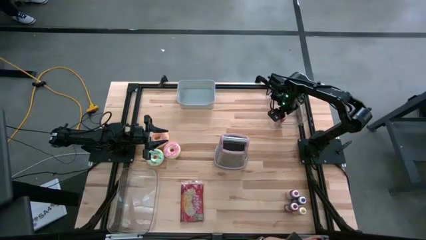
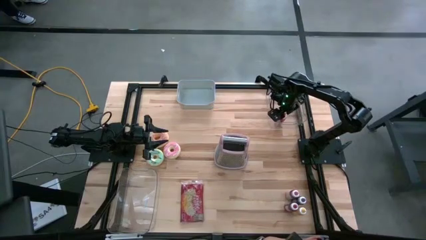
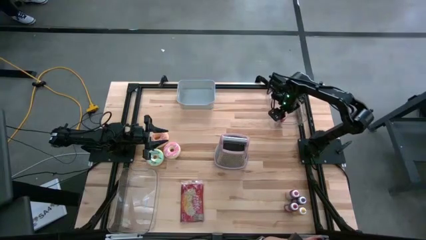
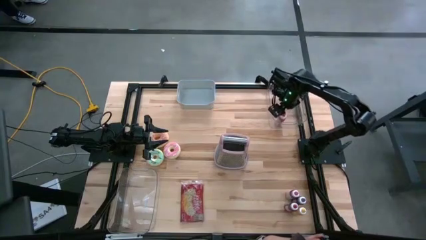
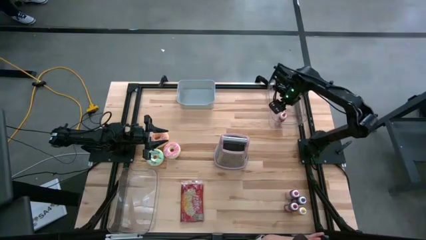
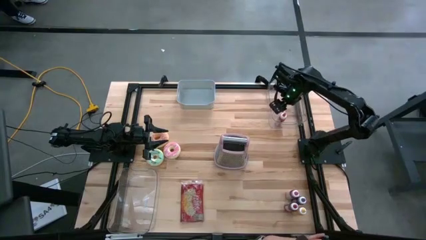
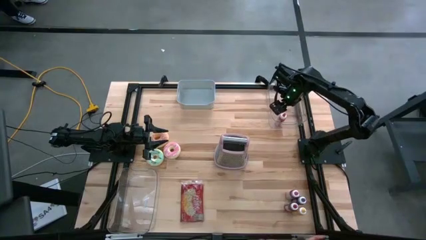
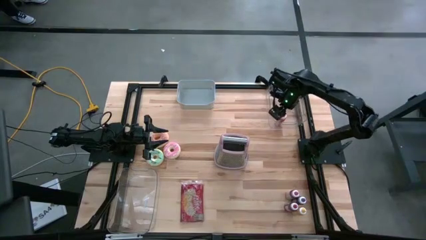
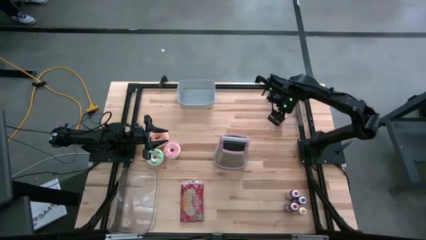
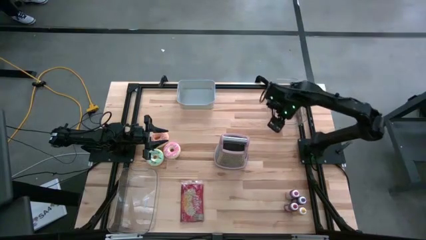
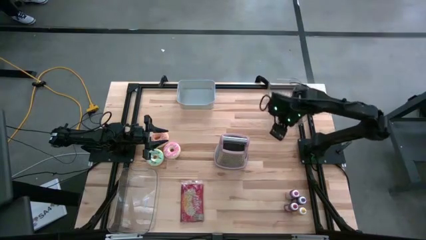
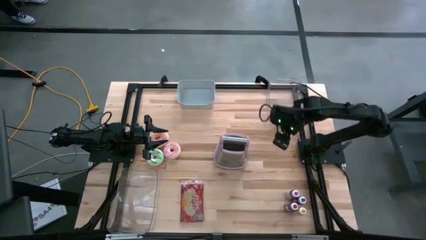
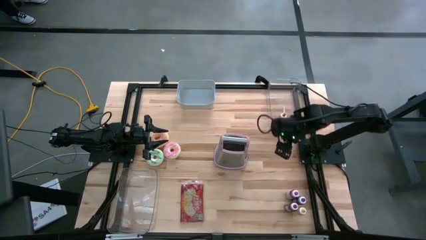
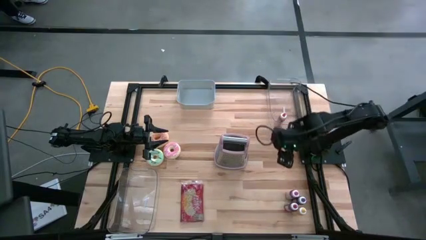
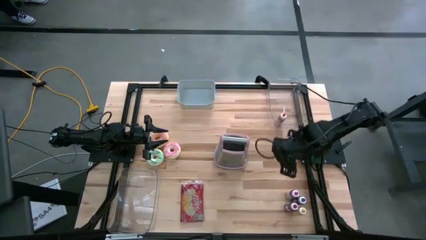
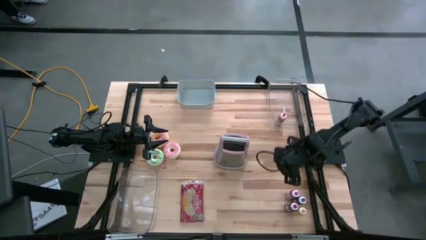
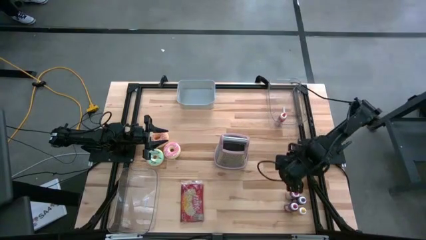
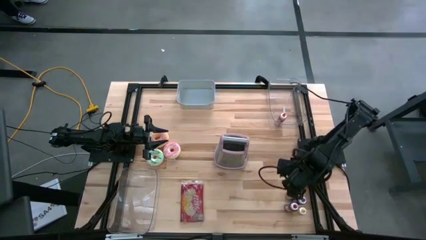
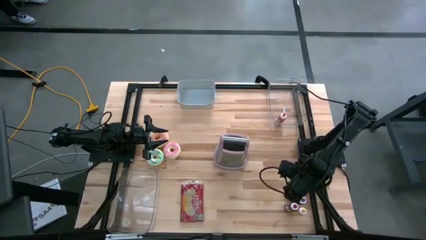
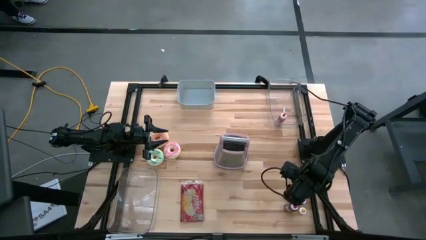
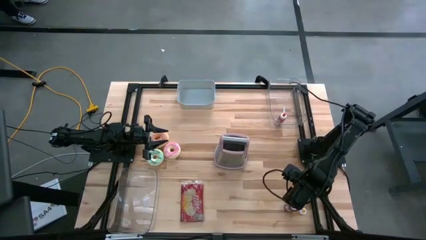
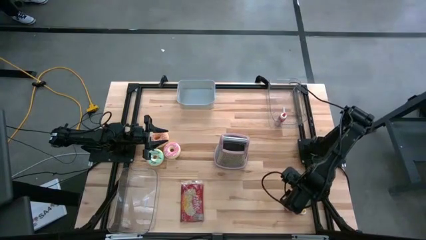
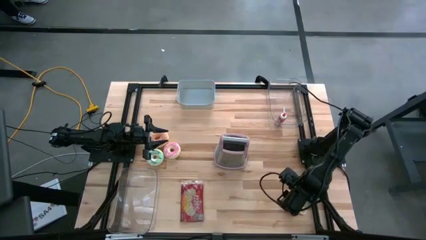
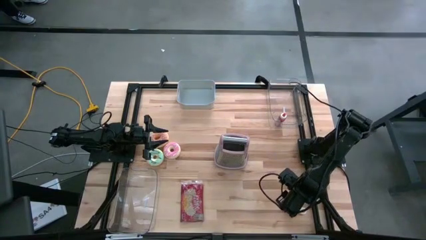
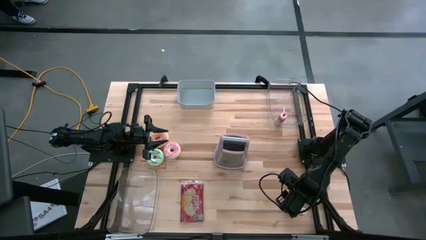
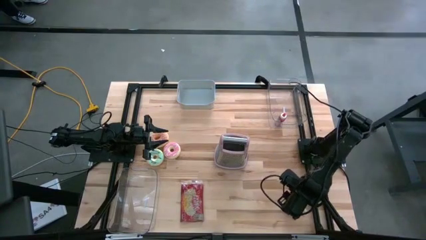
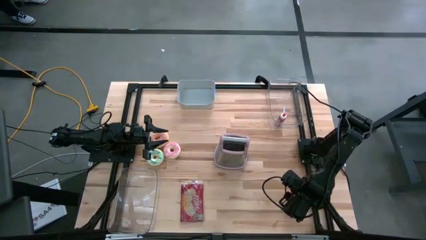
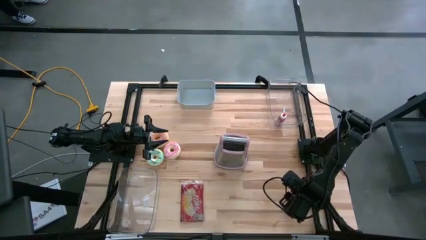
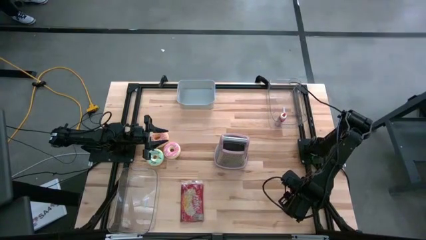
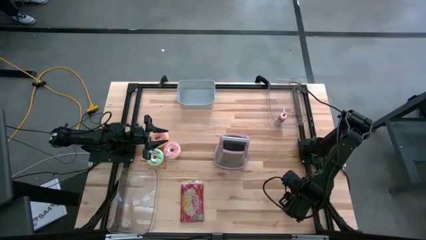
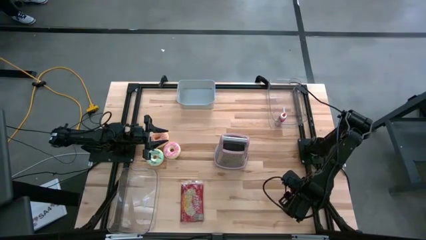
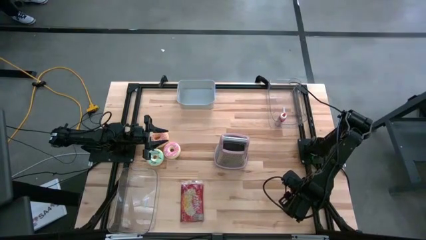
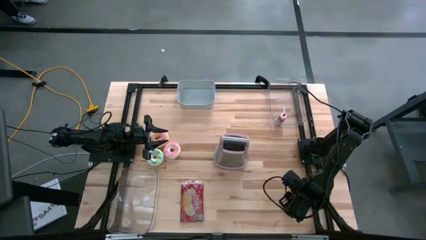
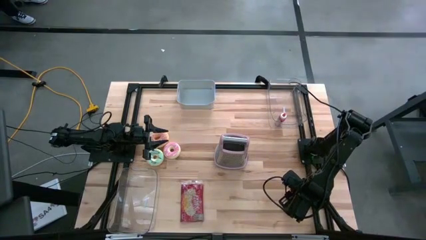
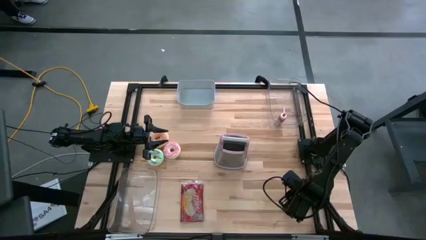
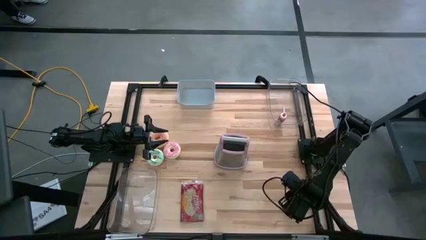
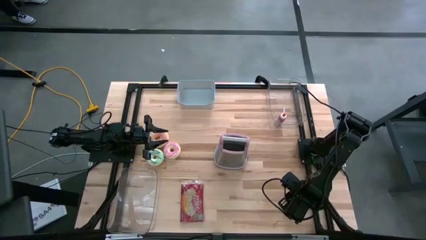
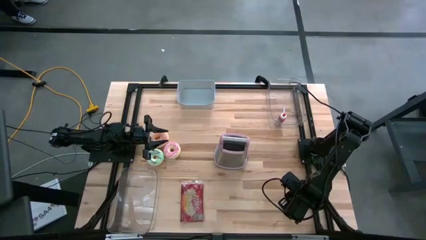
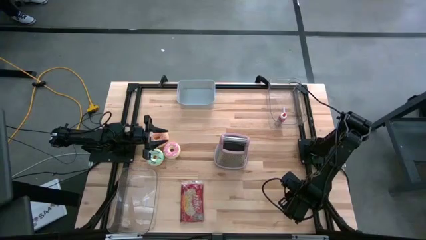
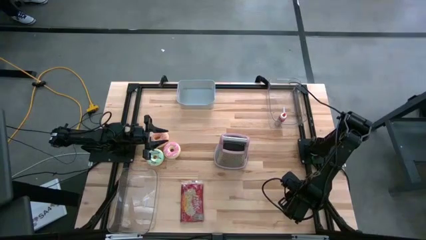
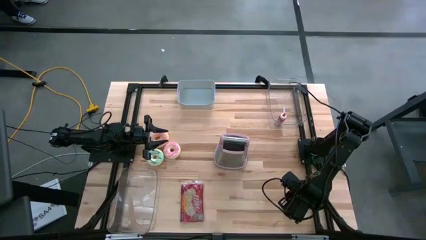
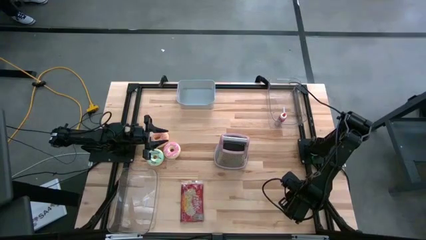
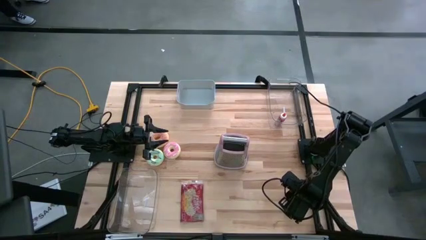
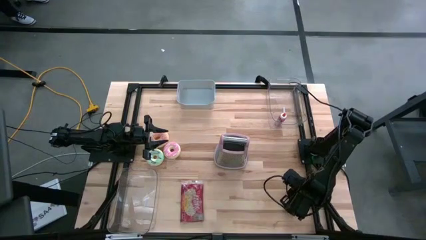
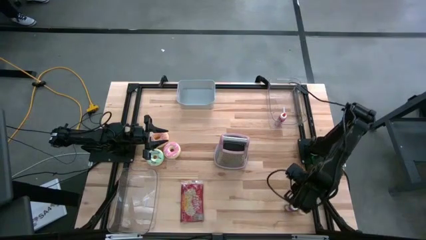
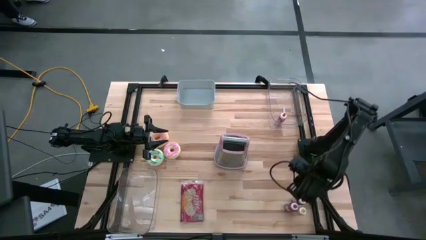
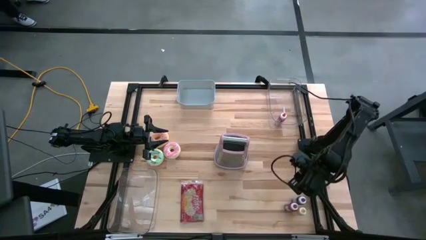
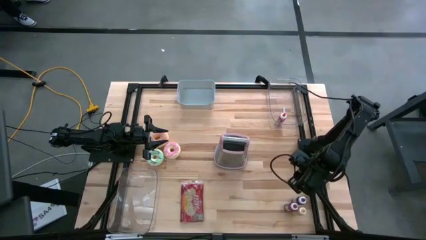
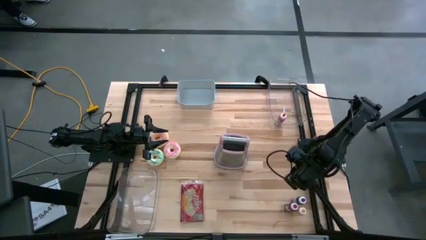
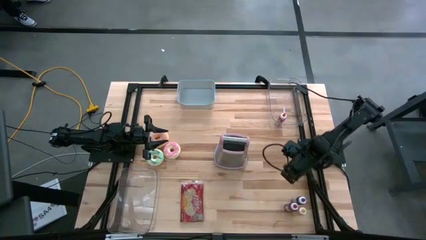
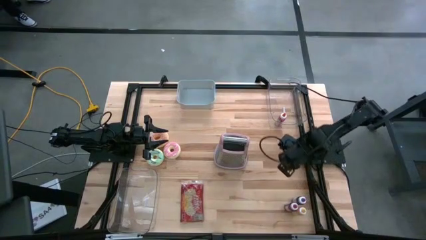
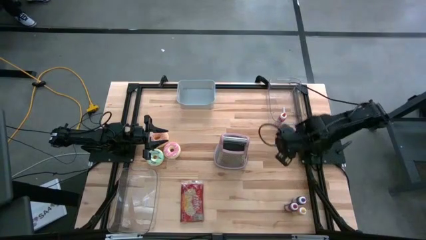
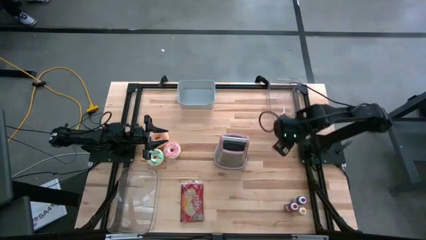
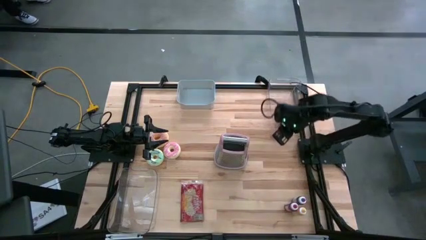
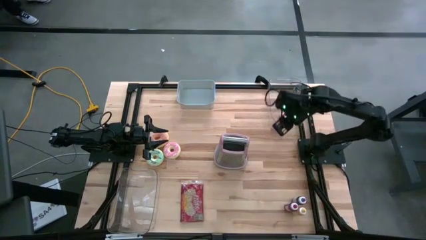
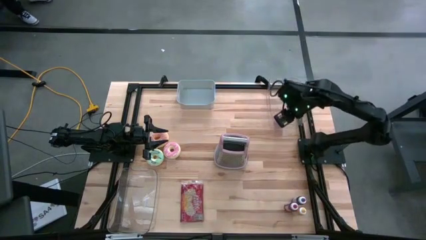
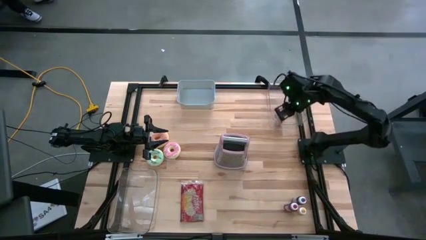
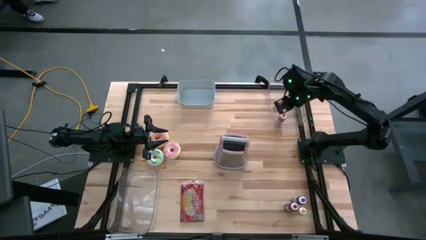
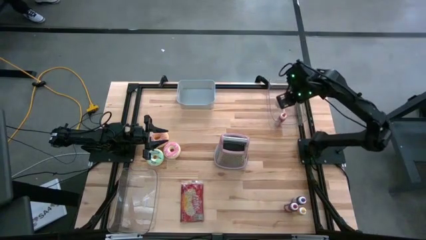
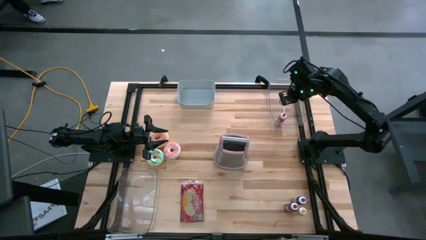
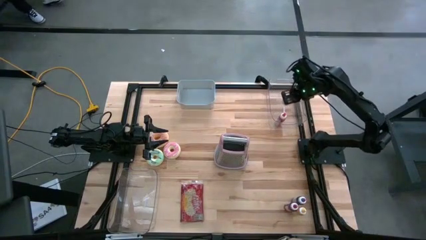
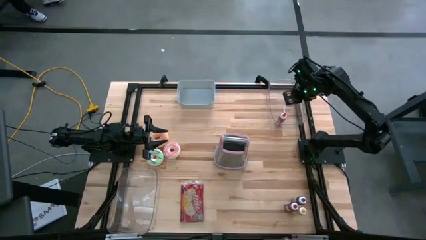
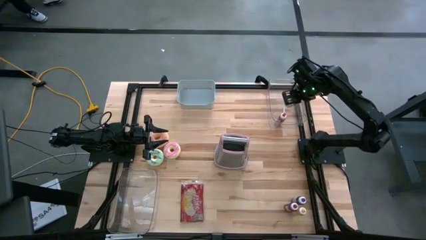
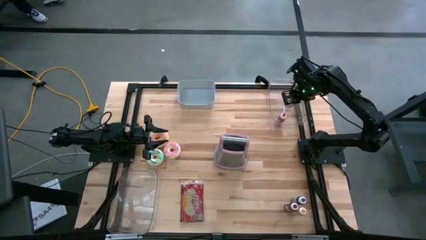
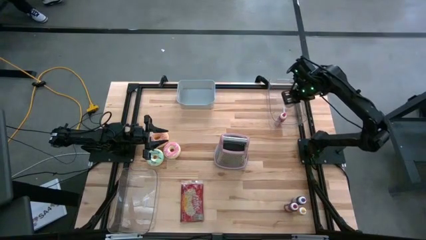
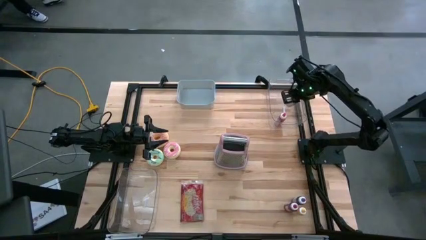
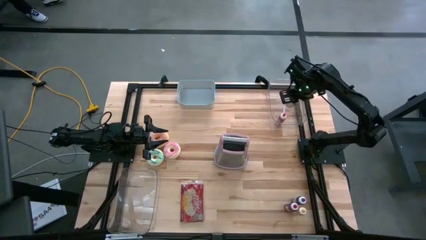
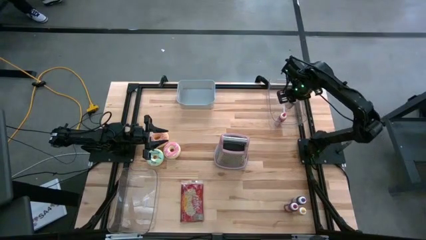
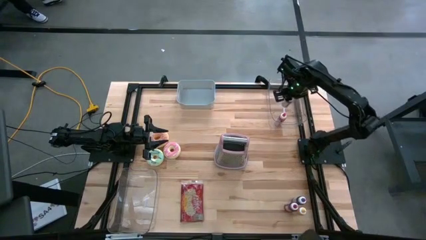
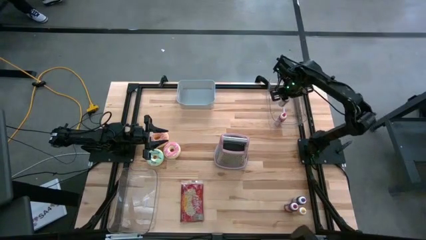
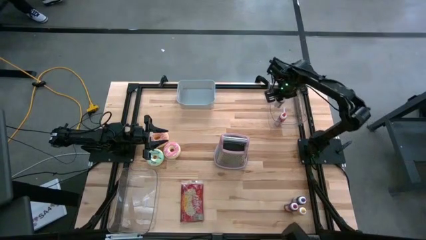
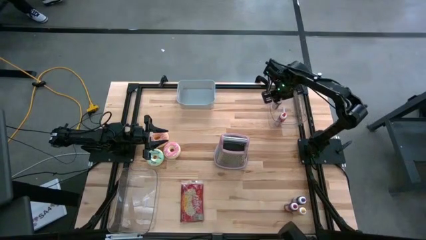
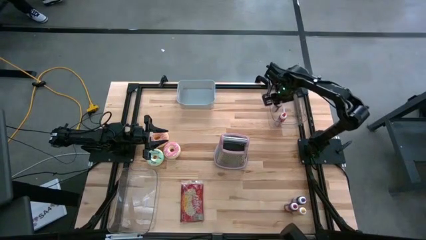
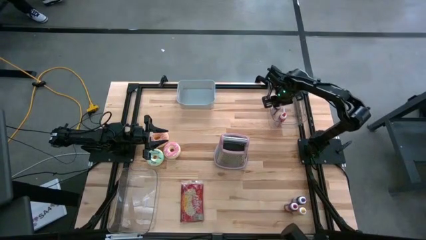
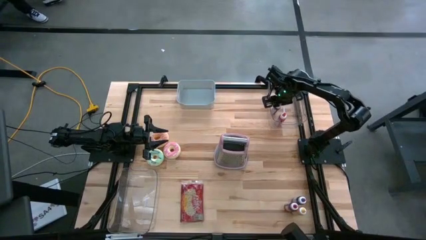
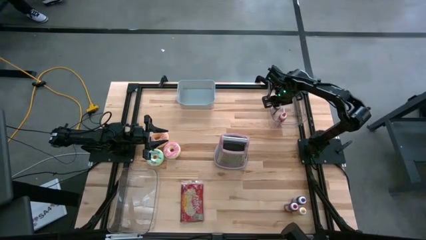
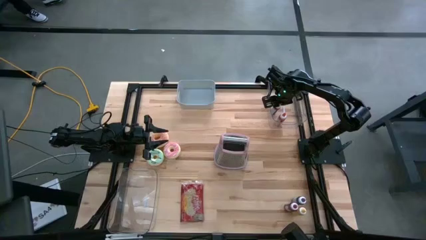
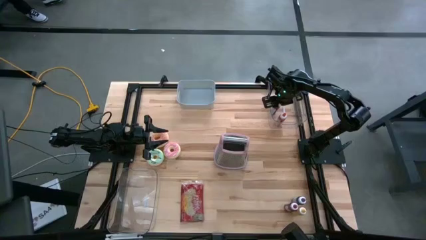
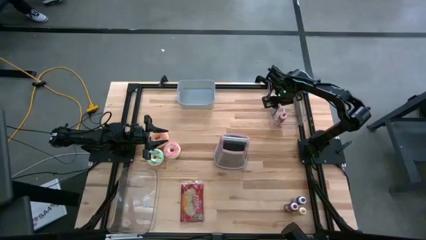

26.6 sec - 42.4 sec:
Put the pink food coloring into the right transparent bin
